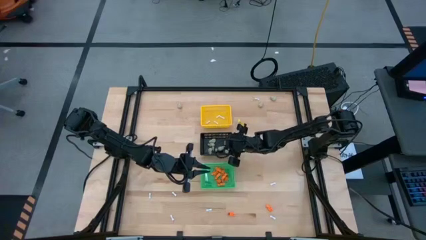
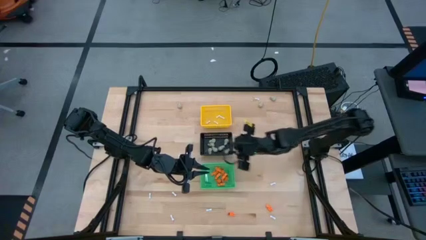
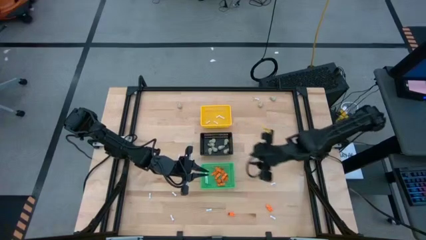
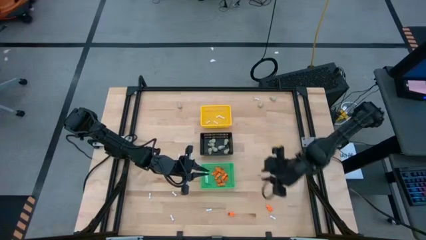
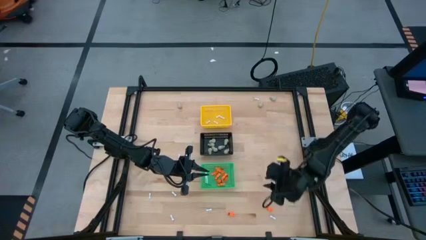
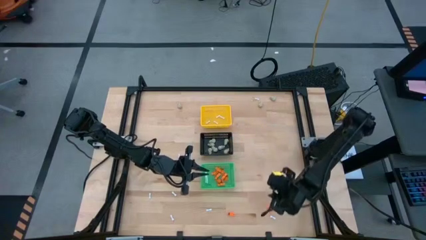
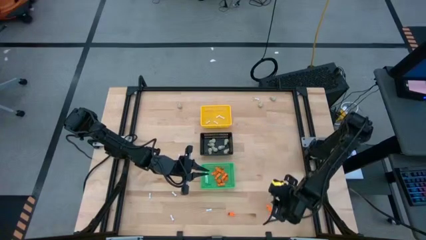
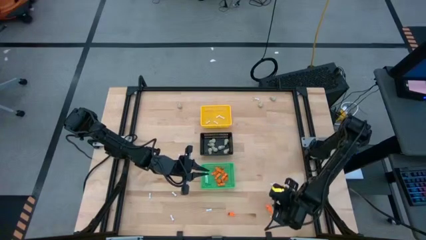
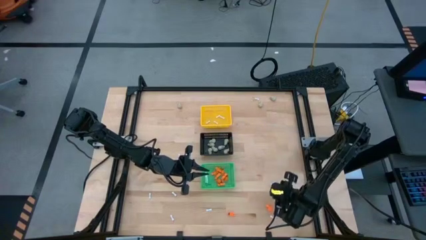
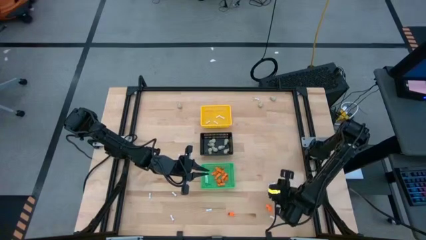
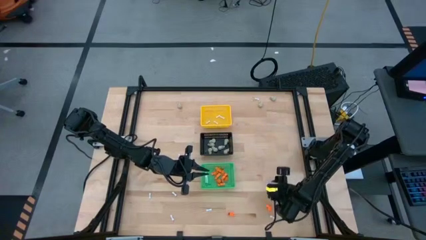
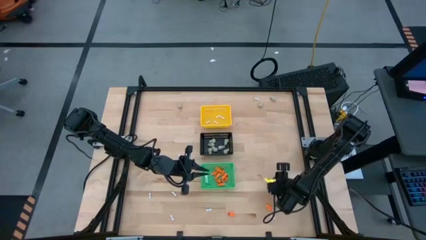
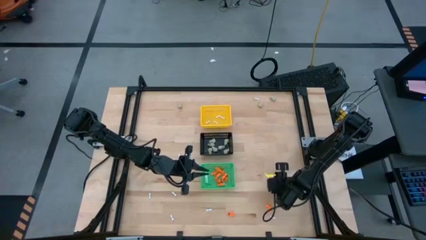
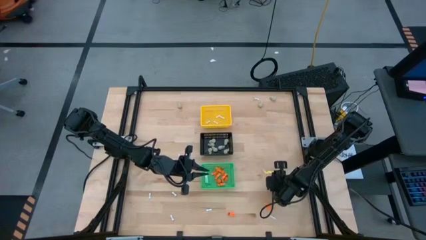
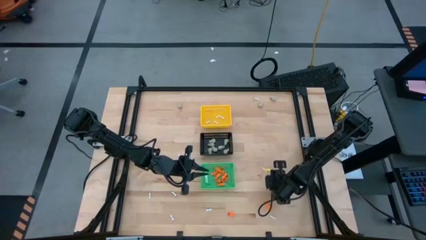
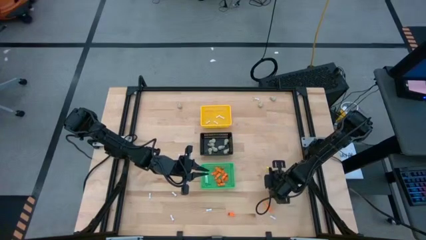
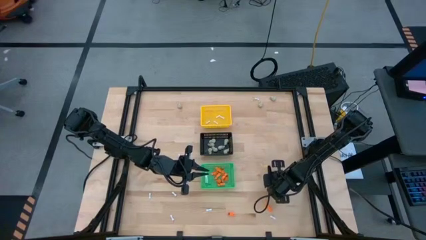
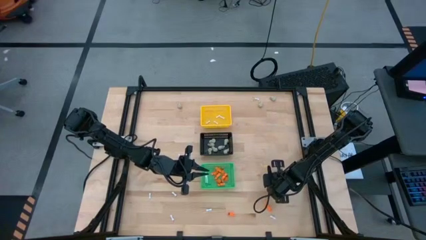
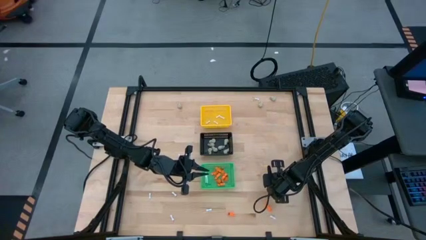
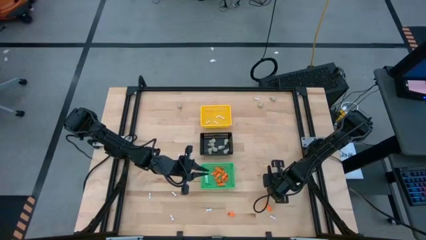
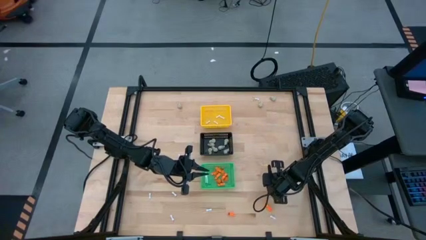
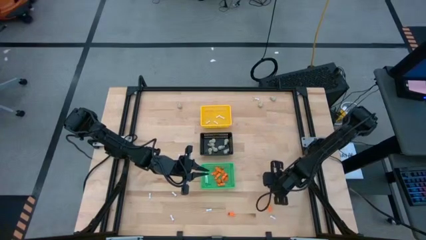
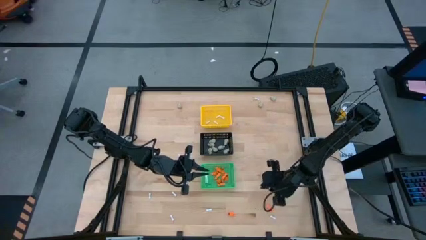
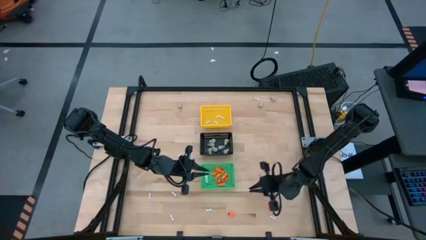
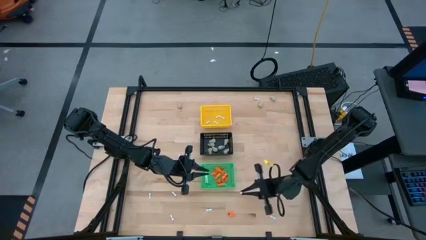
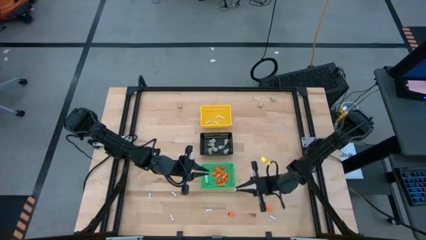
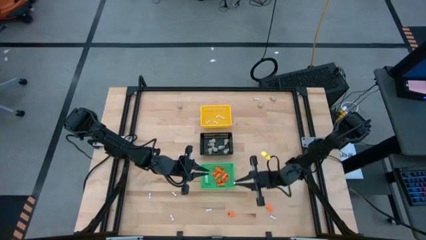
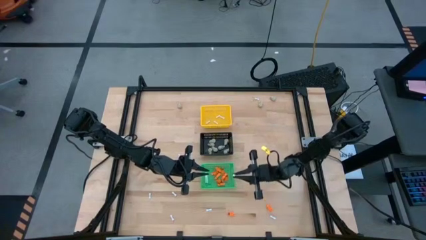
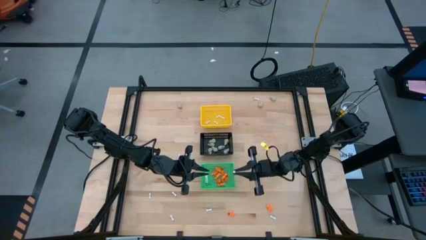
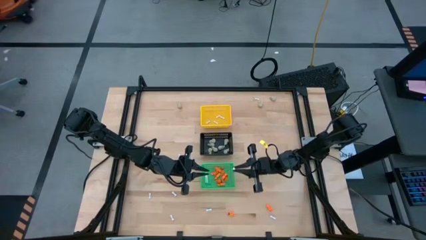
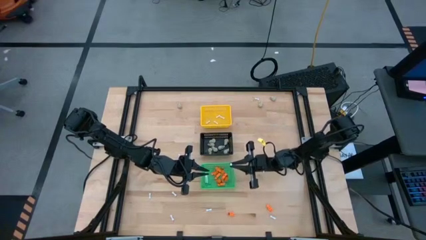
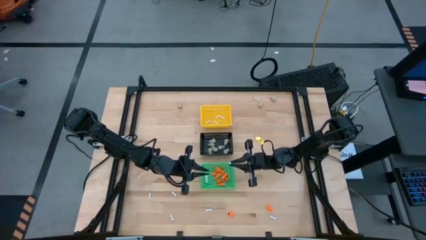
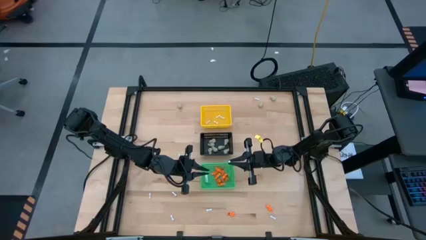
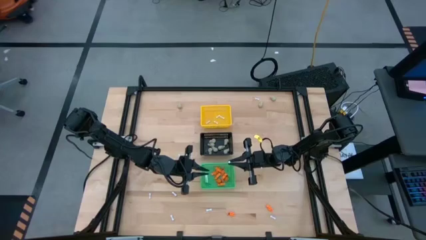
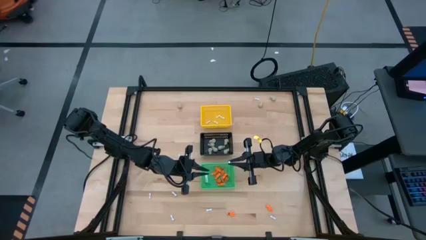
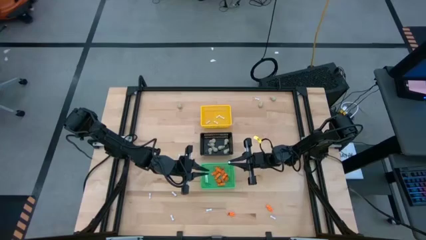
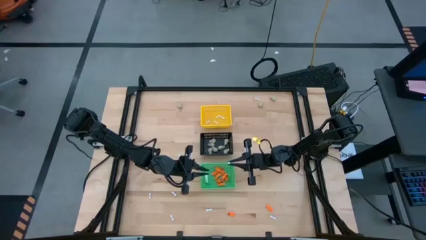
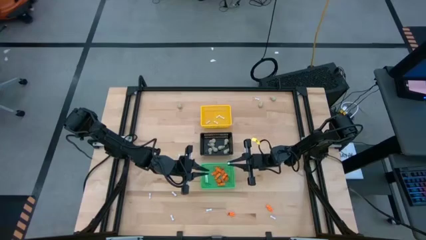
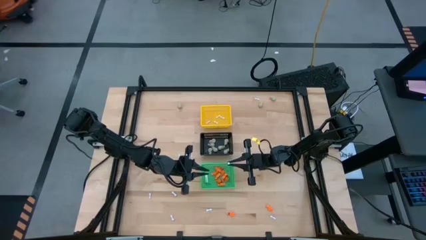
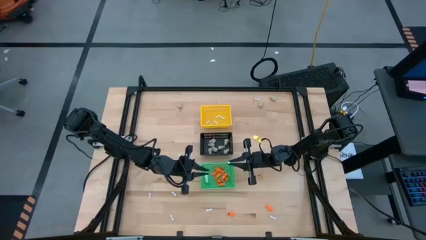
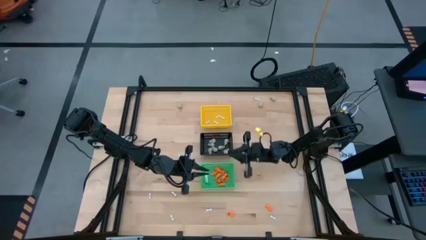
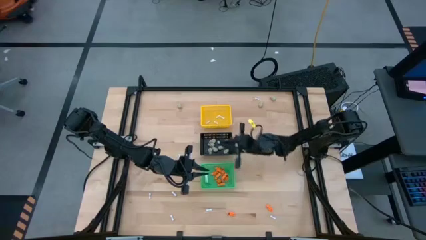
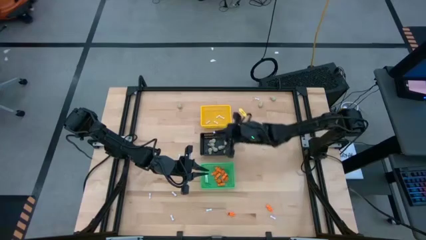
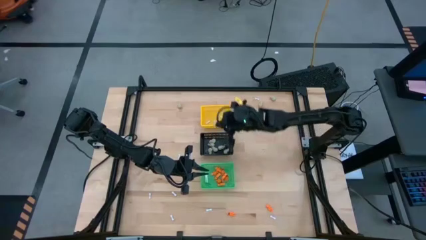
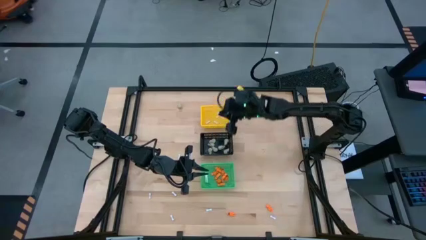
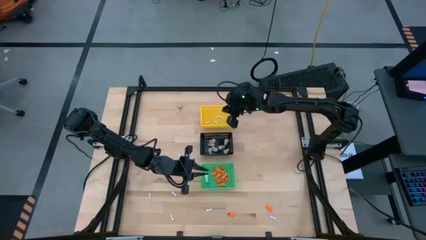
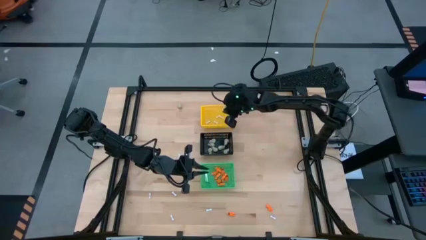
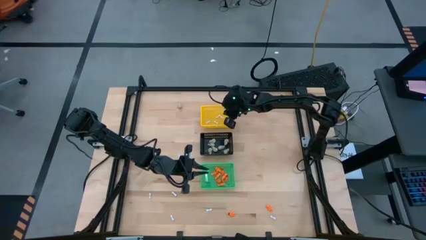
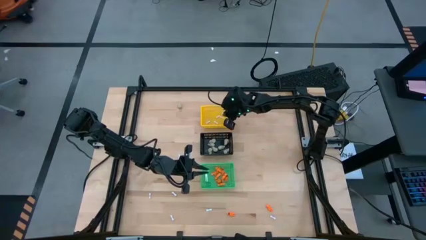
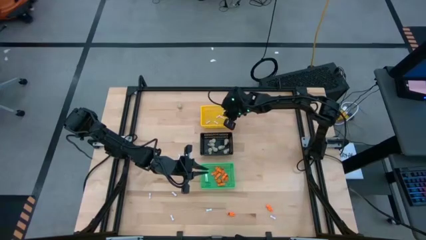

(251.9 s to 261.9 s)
Task: Sort Halloween decoration
Put the white bone toy into the yellow basket

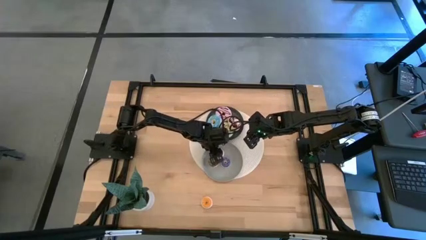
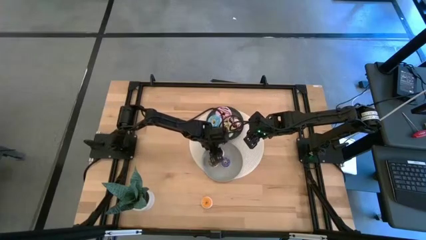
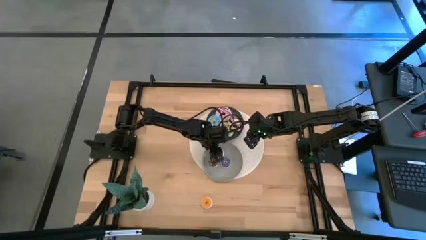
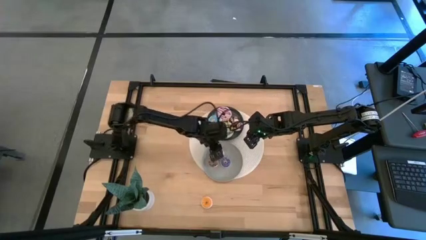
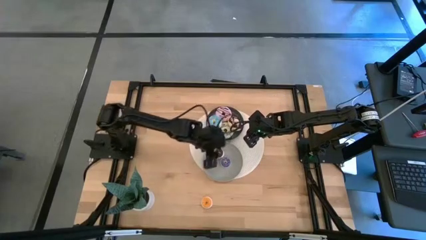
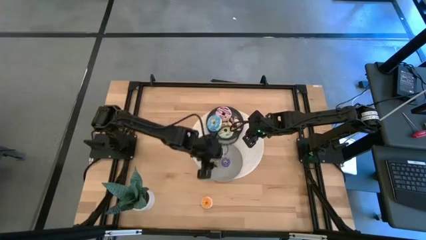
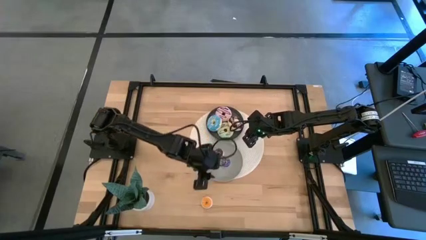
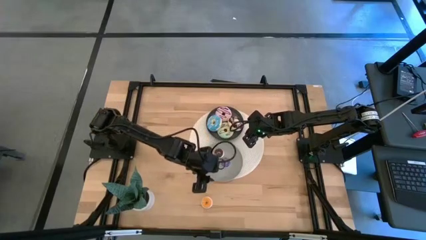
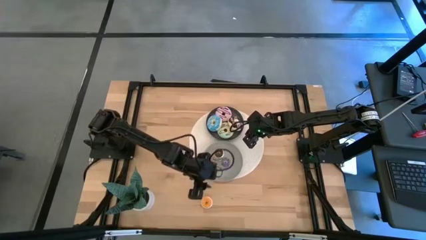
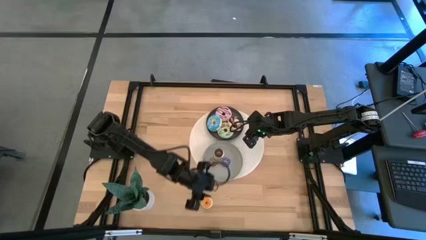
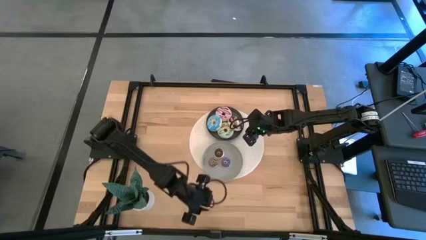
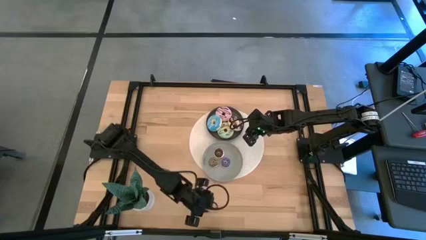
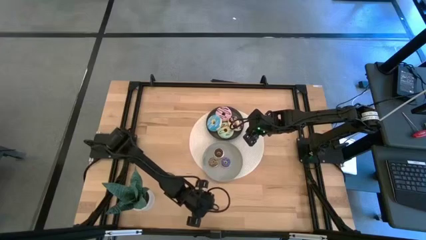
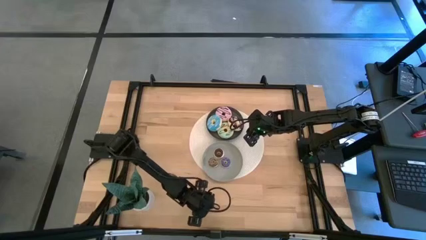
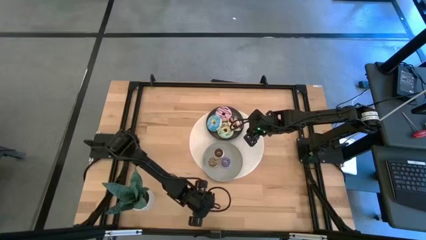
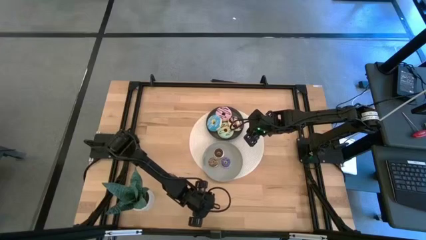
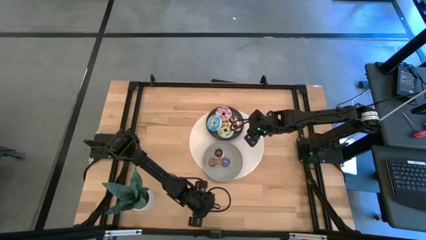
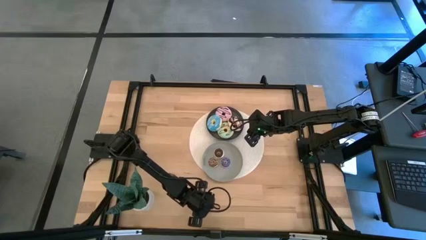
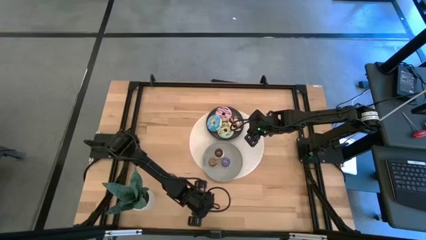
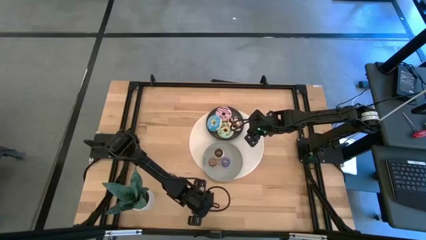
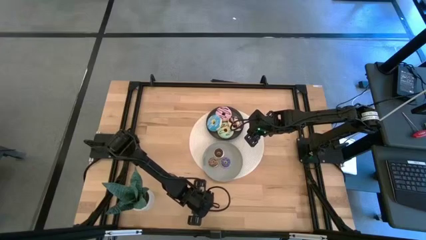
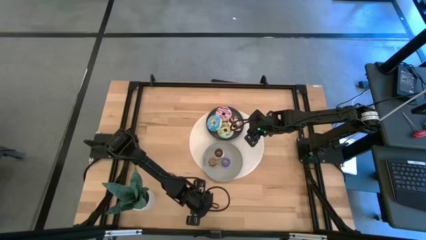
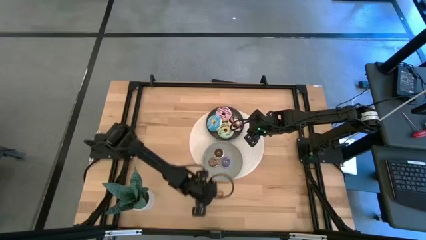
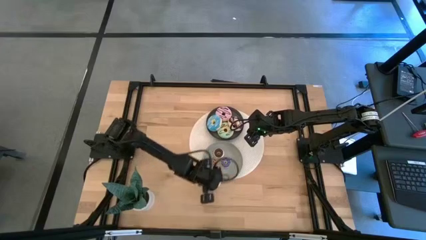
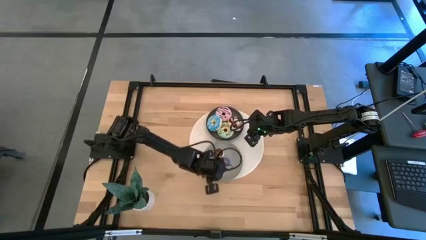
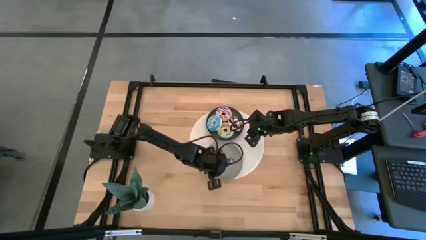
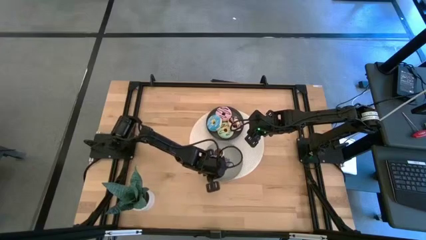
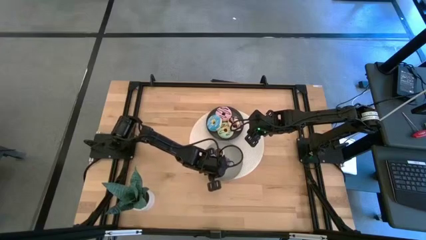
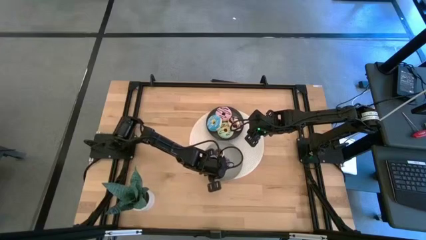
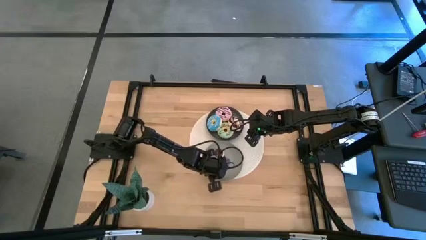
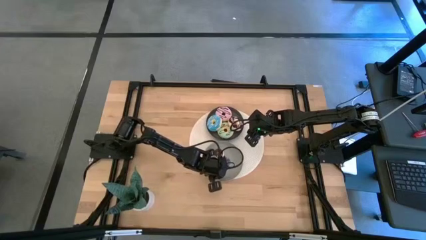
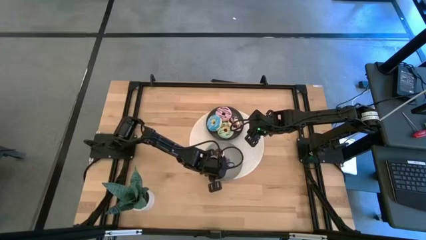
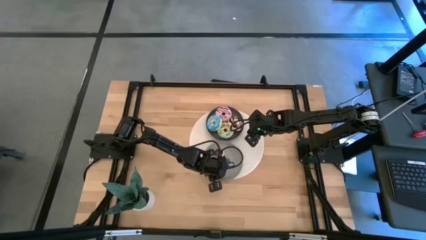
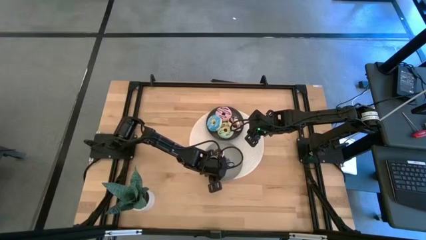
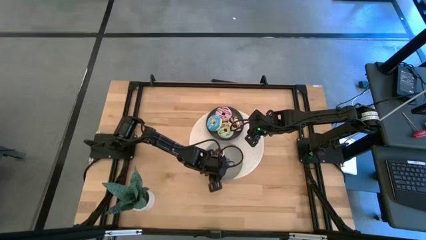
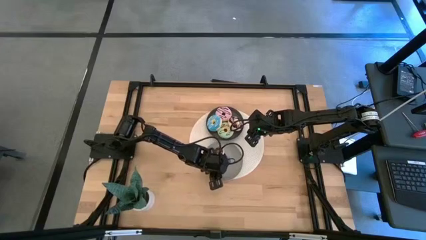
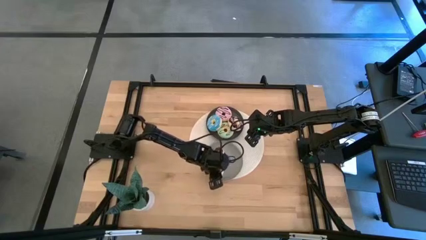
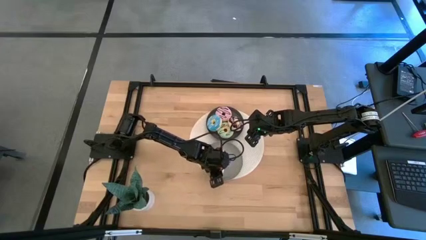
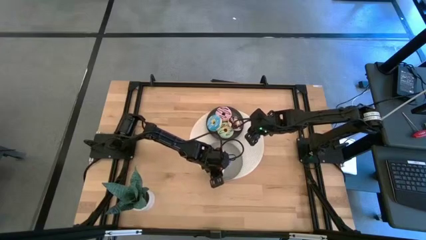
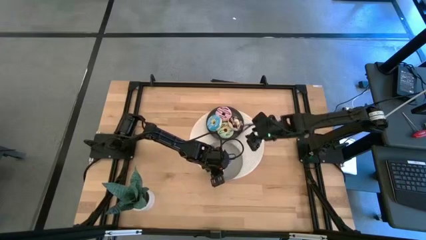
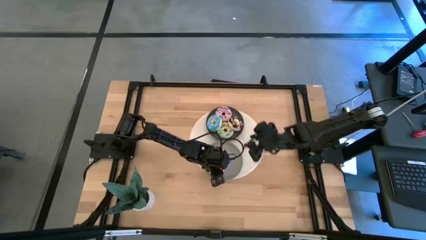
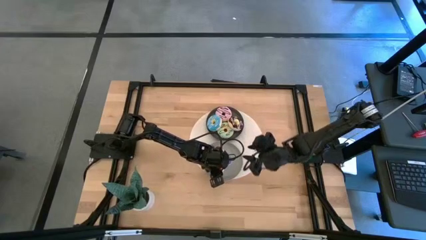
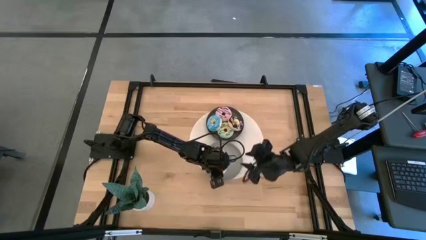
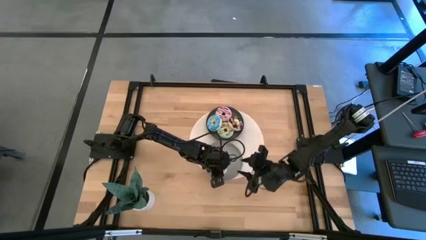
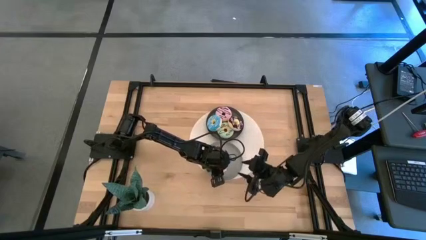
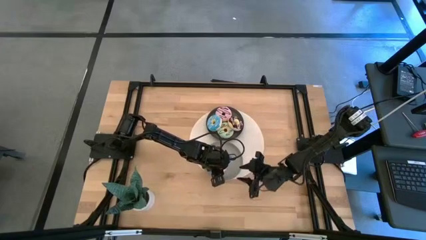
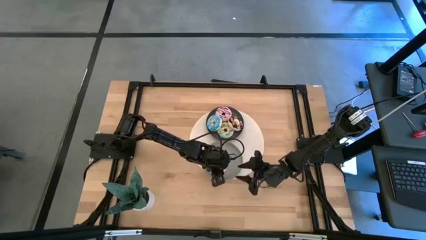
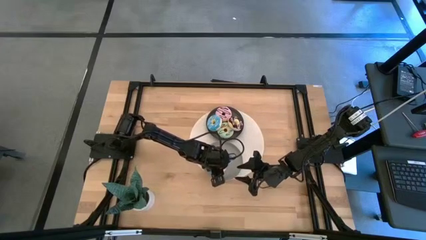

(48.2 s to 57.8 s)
Task: Pick & Place donuts
Put the small orange donut on the gray plate
